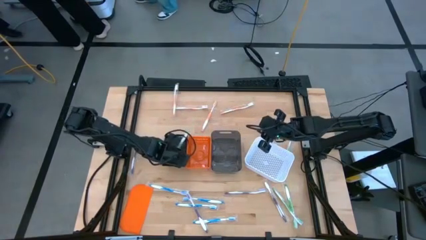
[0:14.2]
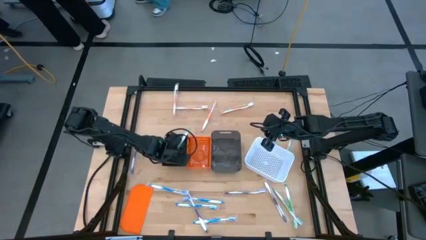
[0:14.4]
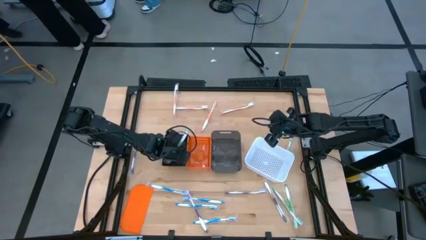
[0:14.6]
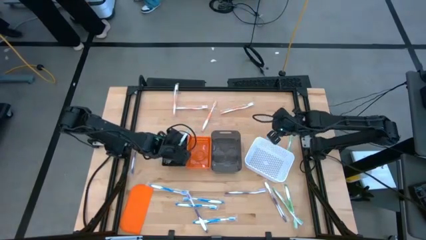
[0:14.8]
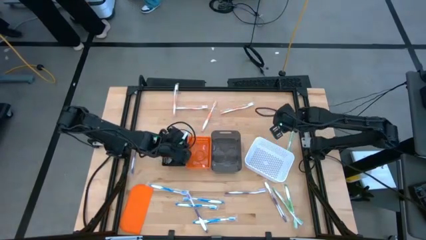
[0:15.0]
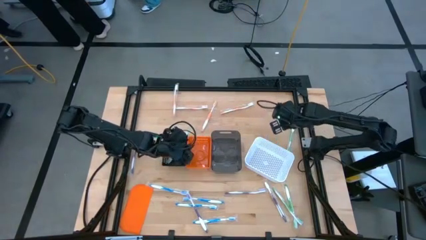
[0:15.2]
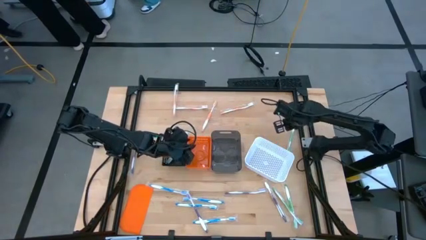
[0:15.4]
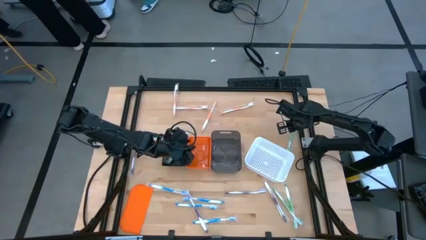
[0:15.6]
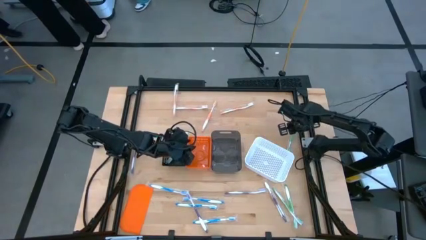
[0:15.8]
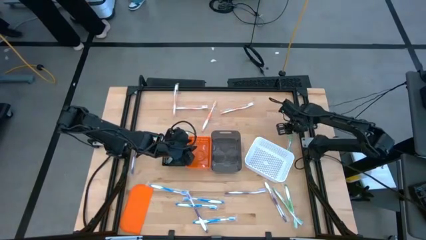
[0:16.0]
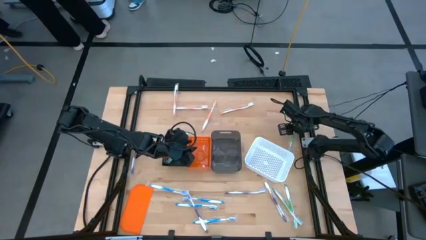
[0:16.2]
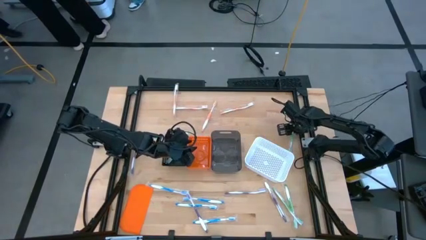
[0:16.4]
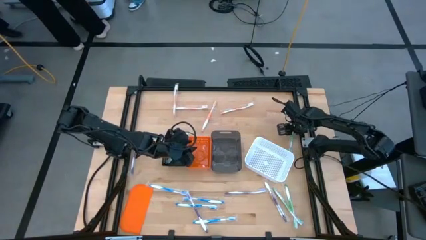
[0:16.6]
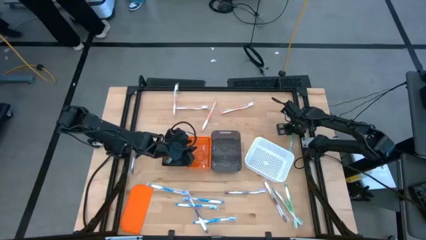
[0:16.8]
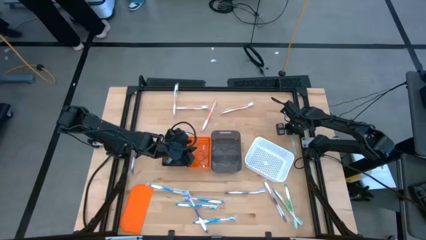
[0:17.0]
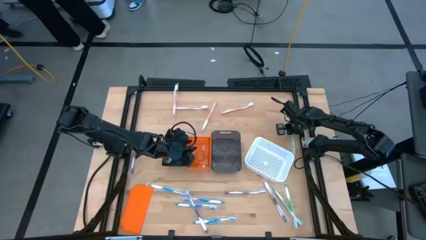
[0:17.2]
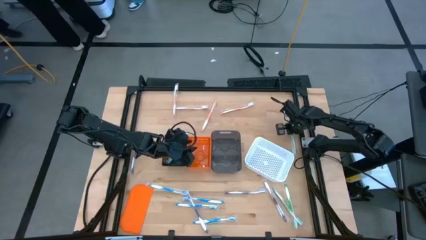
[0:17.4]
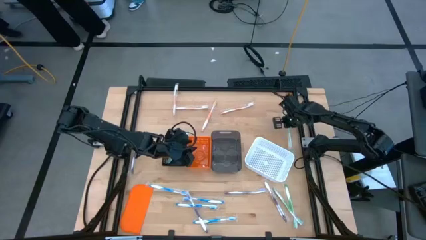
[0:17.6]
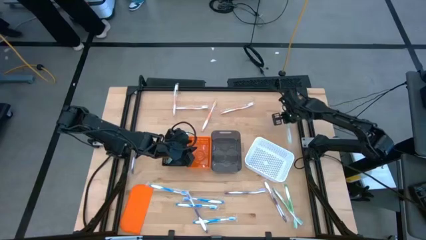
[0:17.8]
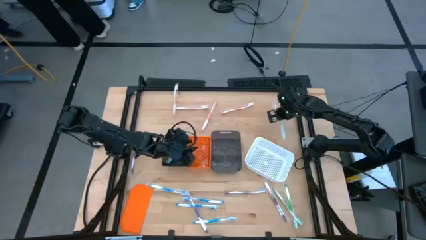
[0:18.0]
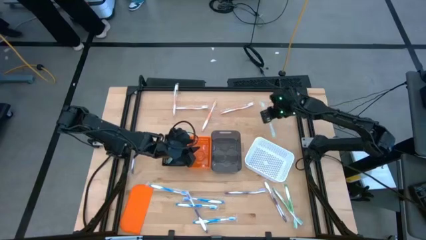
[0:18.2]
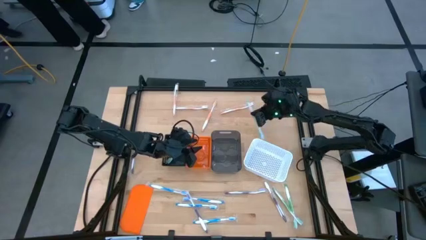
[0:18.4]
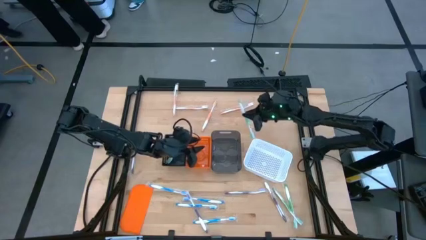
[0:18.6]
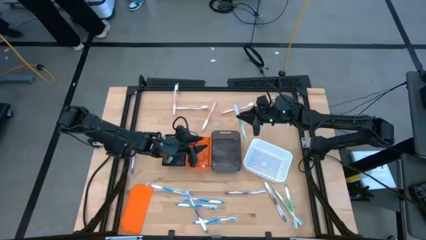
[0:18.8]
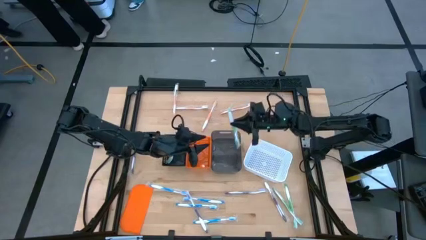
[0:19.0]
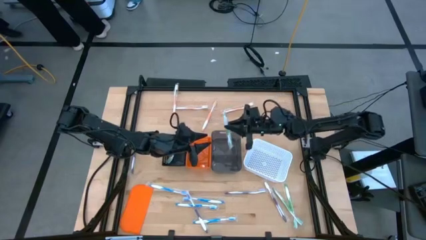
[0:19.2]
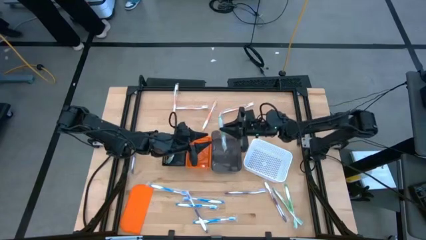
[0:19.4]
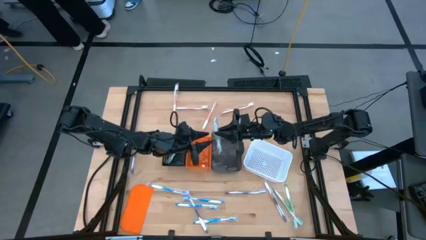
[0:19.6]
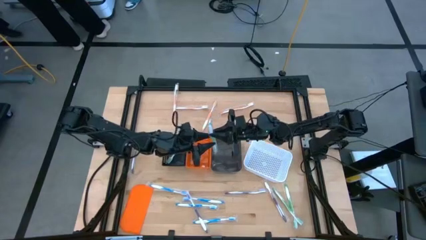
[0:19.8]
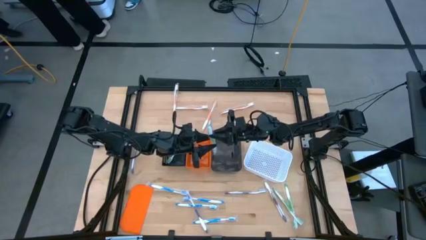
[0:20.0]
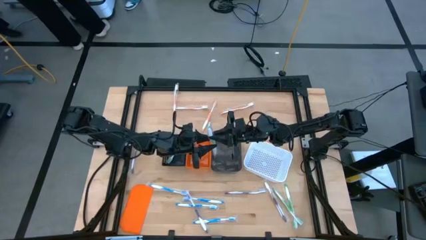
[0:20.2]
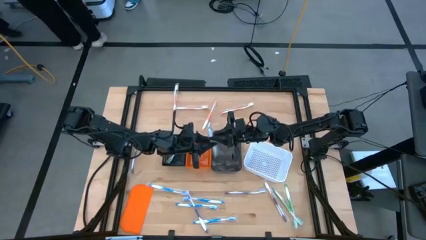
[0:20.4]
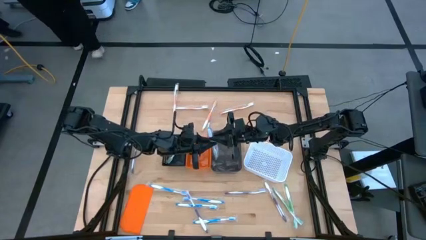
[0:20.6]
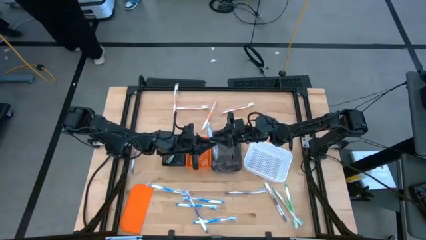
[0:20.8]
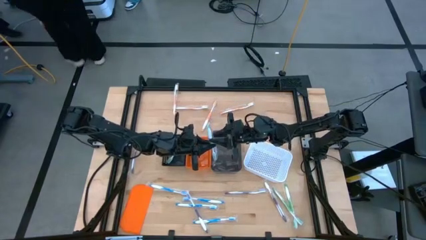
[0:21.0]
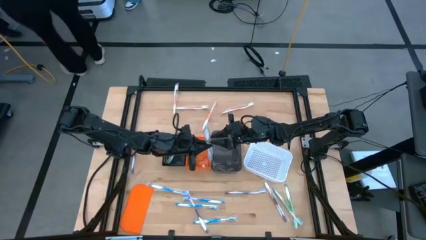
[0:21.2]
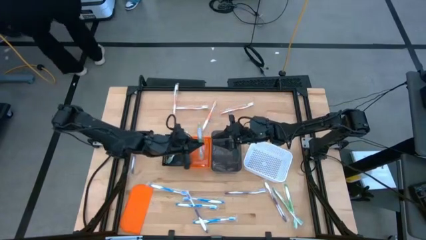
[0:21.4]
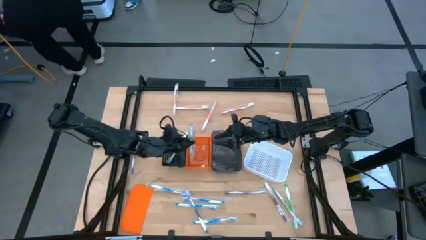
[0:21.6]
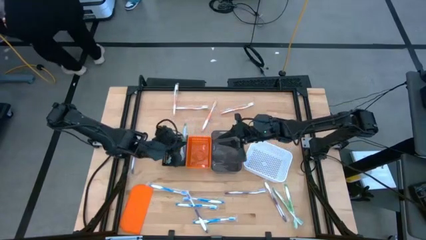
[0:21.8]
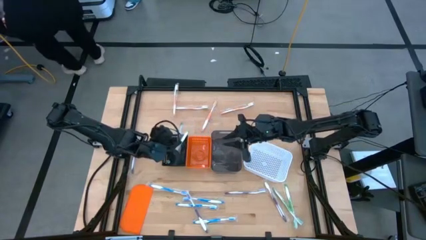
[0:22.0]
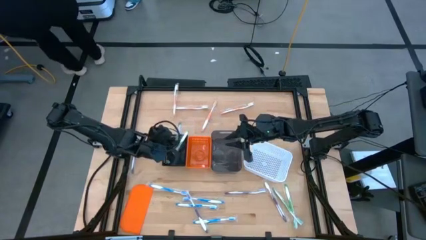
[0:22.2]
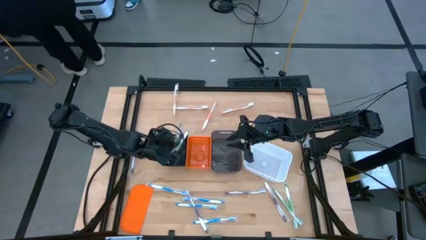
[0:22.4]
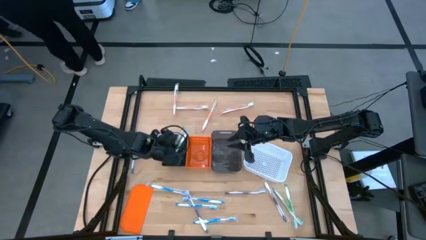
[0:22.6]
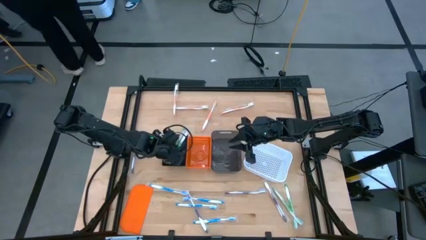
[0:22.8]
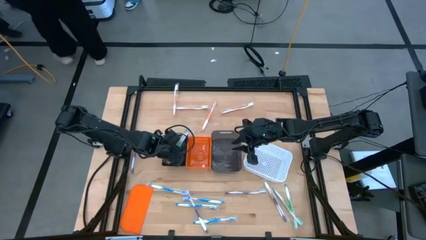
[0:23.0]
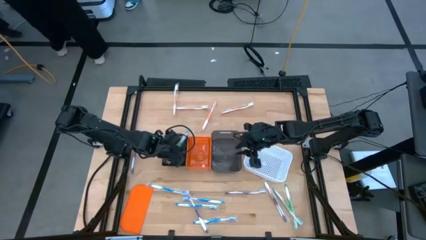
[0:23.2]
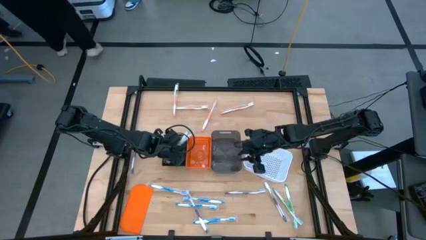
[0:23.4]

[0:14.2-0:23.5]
Task: Pick & Place Toothbrushes
Put the green toothbrush into the black bin

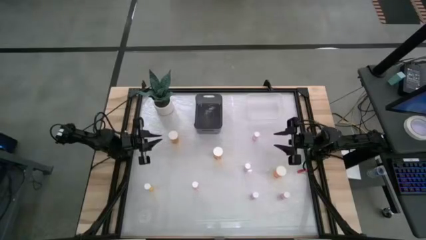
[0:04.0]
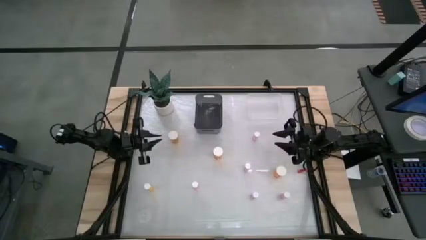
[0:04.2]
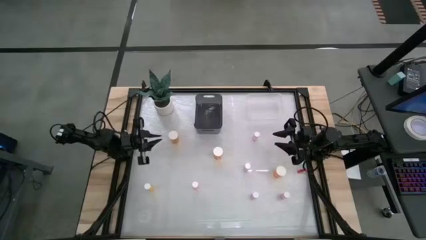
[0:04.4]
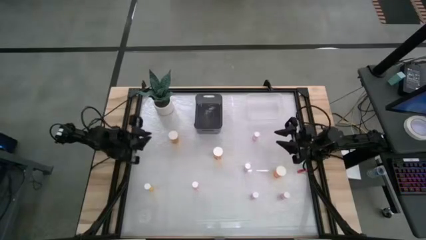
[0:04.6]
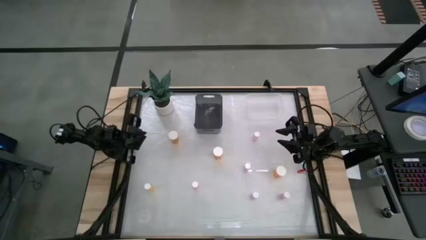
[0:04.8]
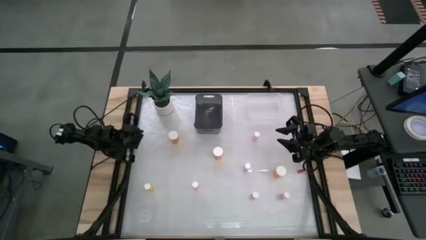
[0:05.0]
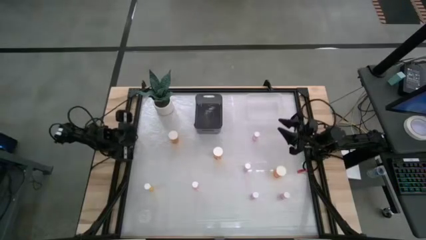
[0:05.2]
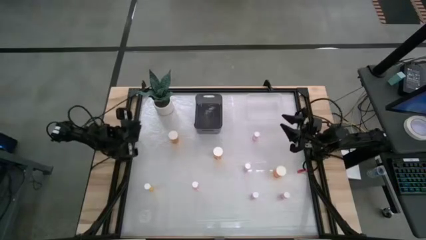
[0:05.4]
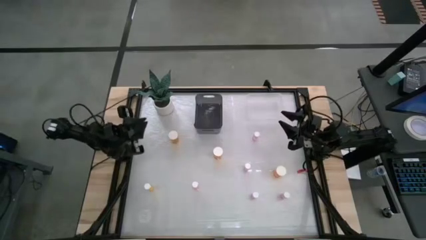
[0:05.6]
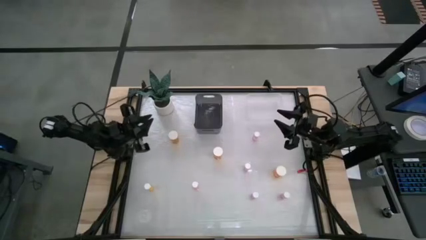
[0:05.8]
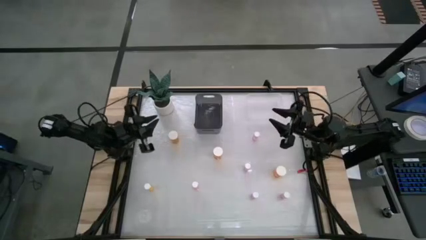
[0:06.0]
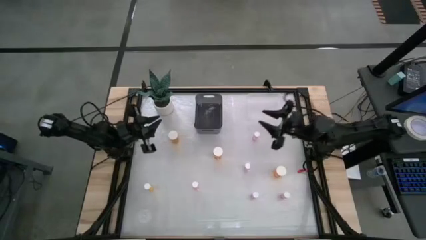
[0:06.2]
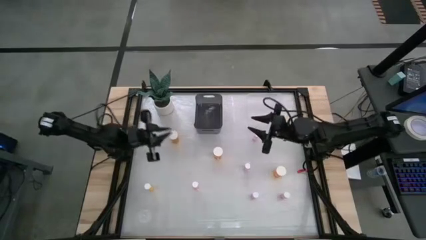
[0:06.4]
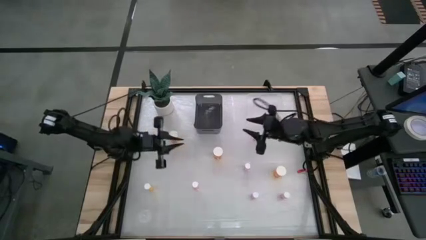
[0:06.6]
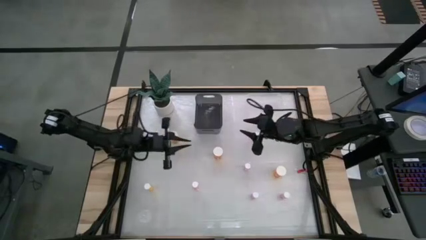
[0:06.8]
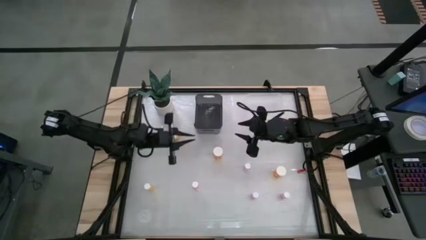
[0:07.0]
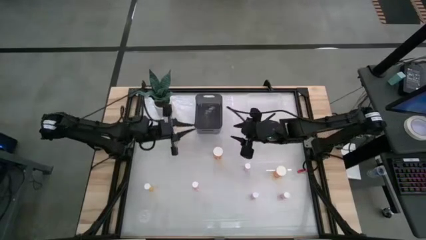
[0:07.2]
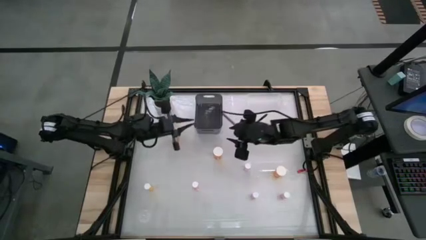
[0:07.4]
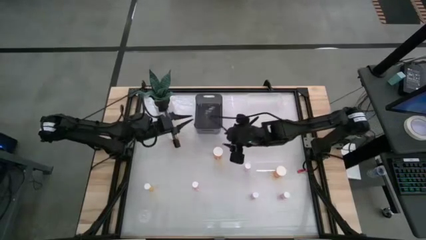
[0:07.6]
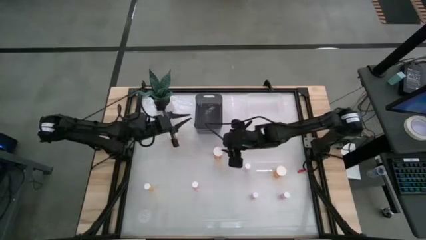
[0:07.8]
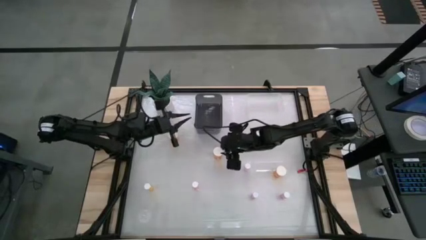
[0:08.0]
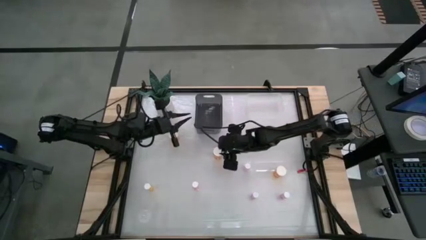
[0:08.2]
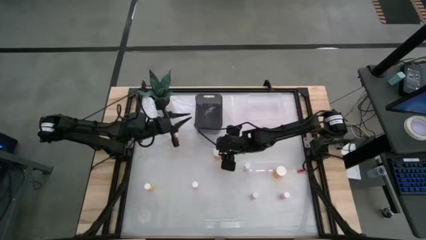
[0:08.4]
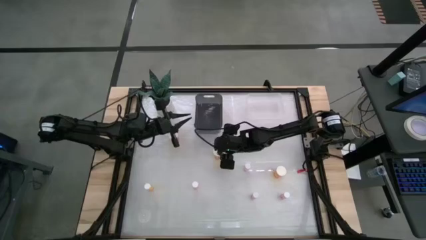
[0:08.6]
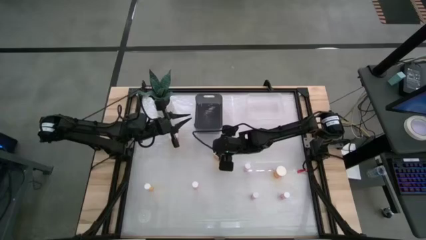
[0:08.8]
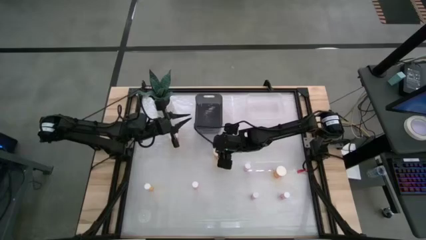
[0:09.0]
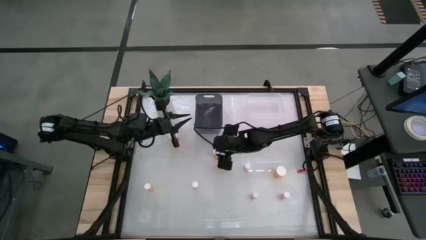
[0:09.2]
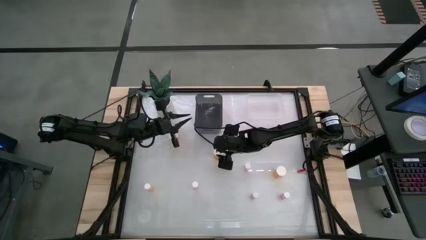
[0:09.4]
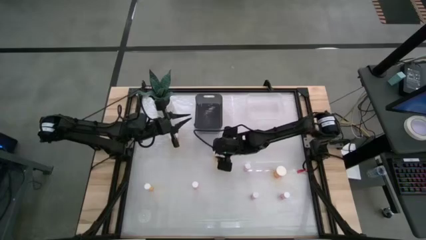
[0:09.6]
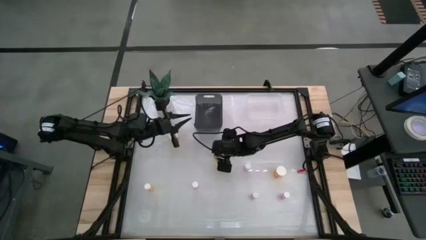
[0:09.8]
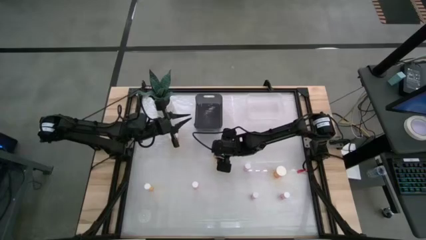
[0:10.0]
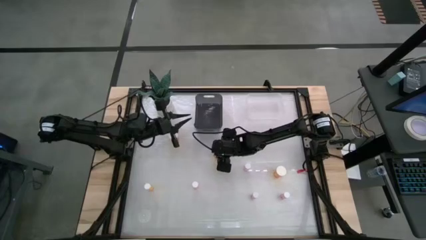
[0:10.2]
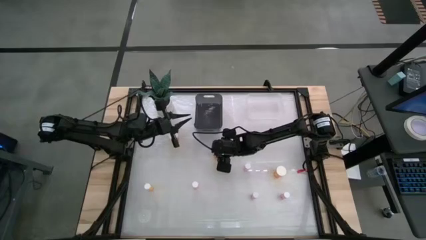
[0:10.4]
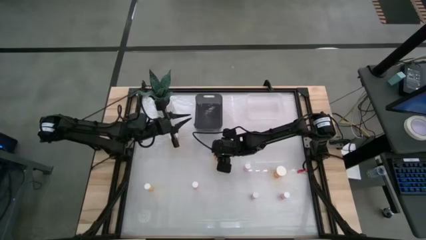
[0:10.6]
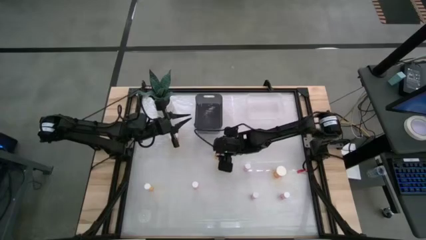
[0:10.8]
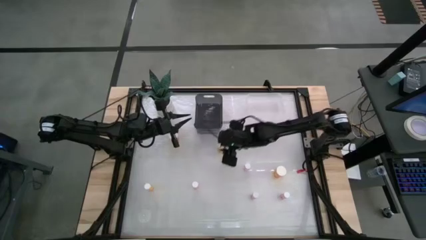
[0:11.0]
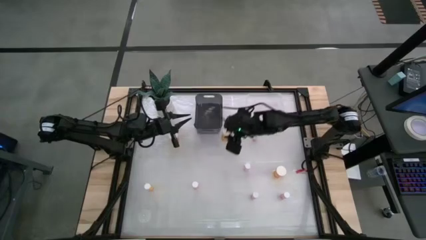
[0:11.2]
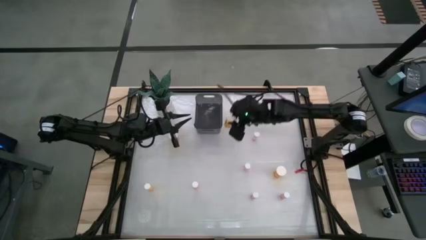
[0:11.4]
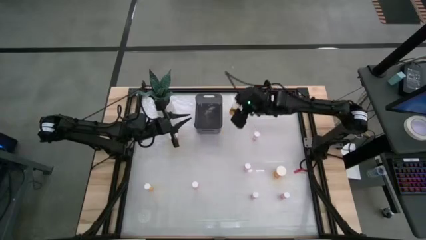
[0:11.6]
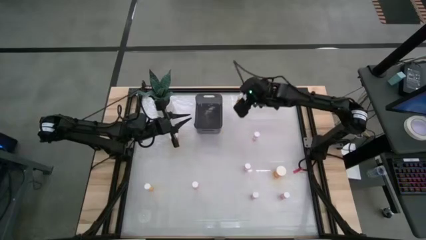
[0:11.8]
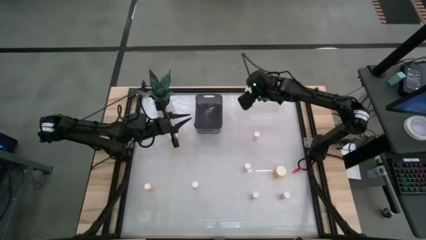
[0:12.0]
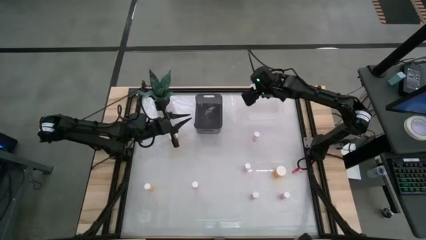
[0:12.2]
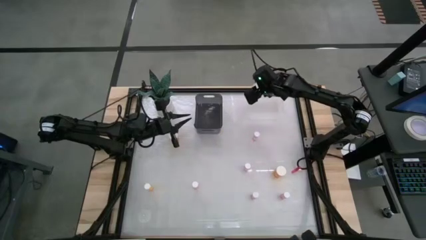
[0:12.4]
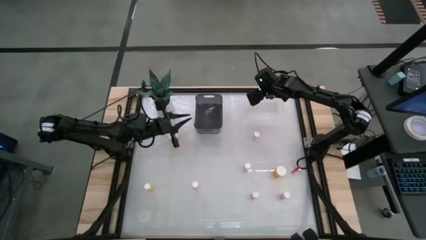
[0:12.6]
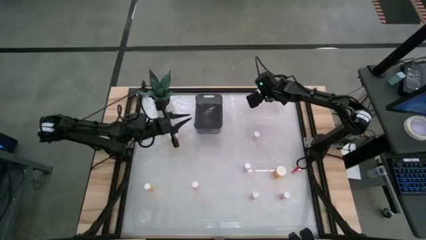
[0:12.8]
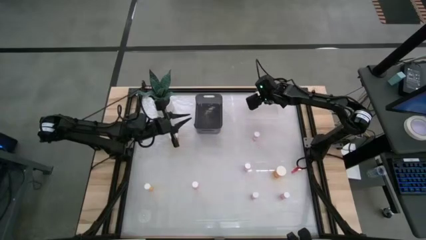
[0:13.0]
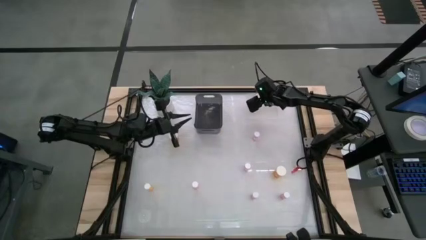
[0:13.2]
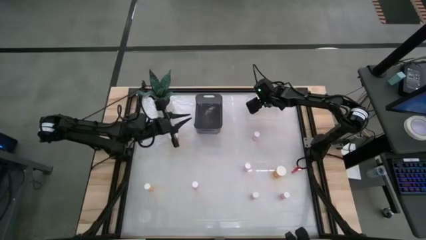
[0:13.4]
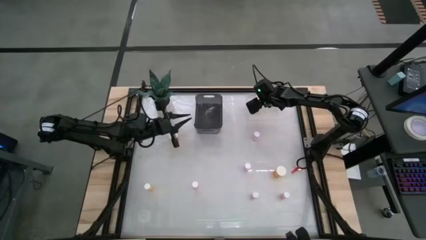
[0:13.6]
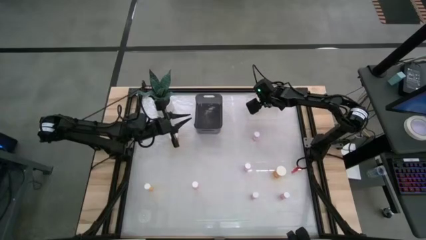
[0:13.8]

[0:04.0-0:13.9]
Task: Pick and place medicine bottles into bin by pill shape (circle, oval)
Put the large orange pill bottle into the transparent bin
